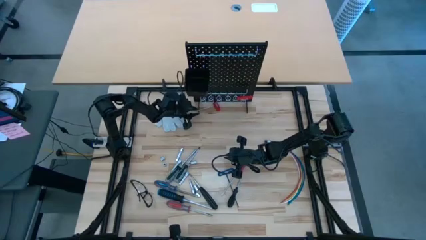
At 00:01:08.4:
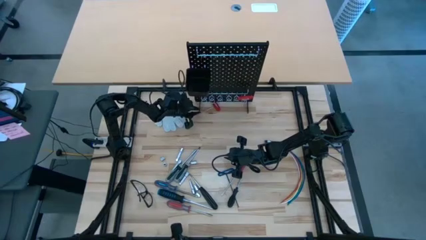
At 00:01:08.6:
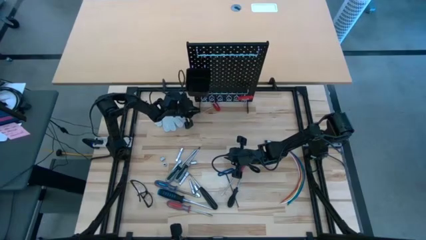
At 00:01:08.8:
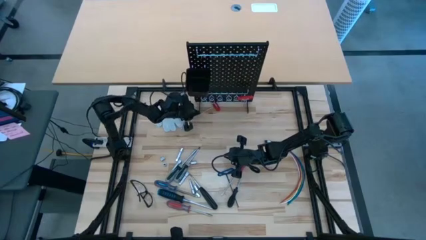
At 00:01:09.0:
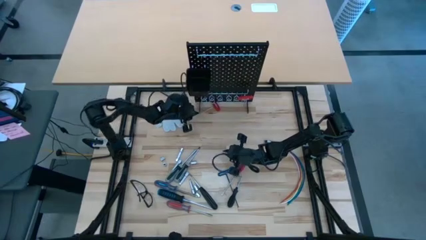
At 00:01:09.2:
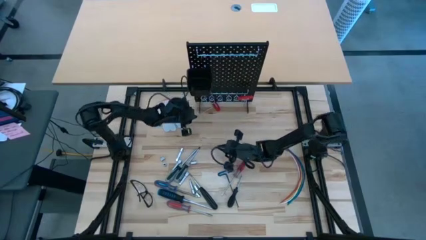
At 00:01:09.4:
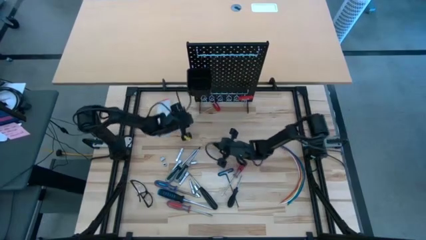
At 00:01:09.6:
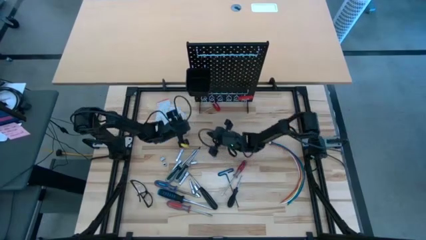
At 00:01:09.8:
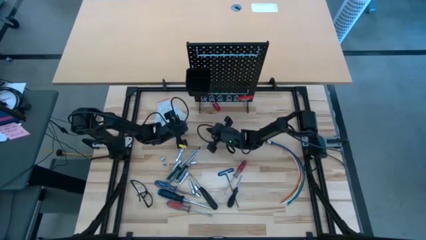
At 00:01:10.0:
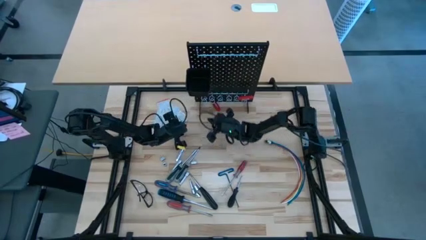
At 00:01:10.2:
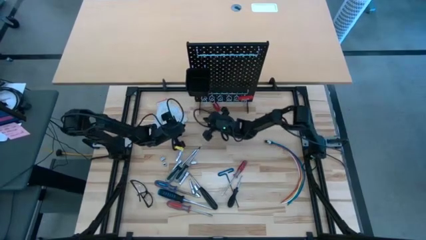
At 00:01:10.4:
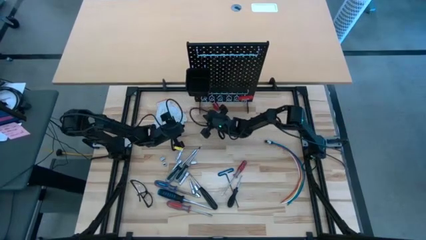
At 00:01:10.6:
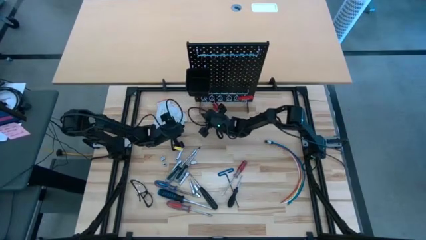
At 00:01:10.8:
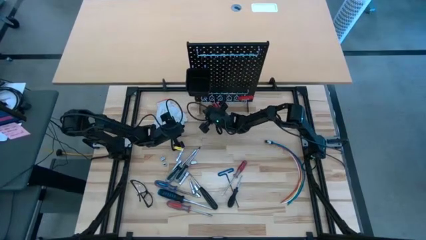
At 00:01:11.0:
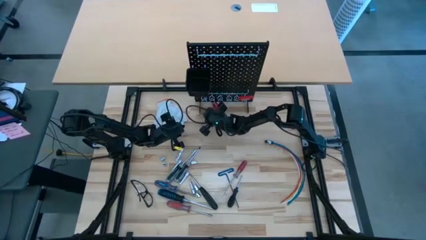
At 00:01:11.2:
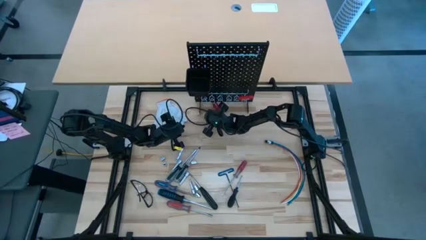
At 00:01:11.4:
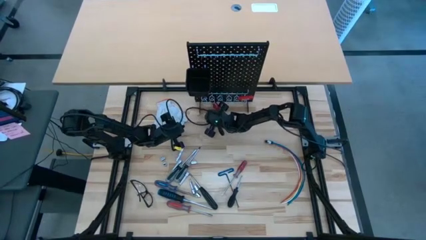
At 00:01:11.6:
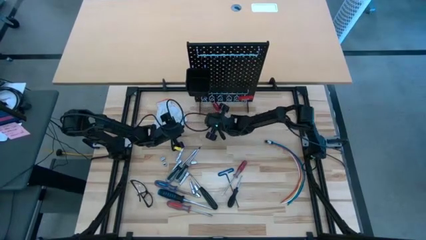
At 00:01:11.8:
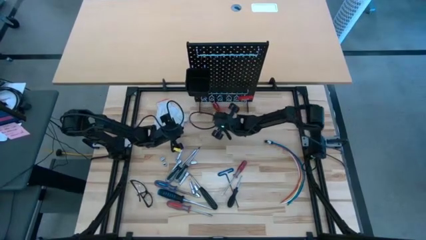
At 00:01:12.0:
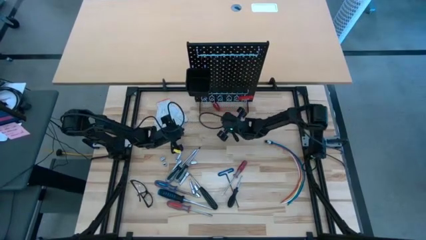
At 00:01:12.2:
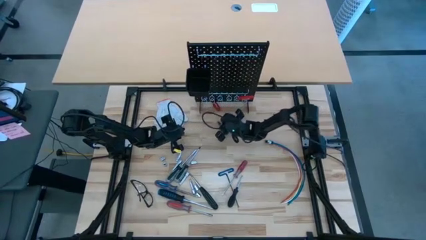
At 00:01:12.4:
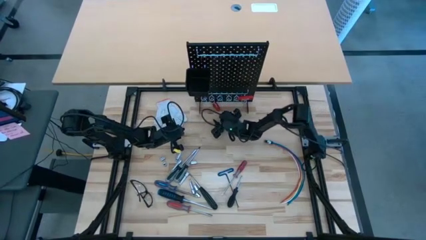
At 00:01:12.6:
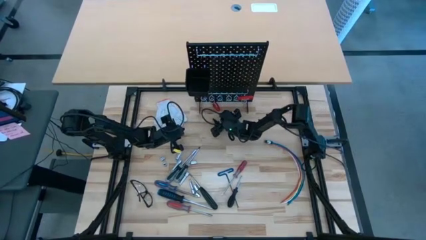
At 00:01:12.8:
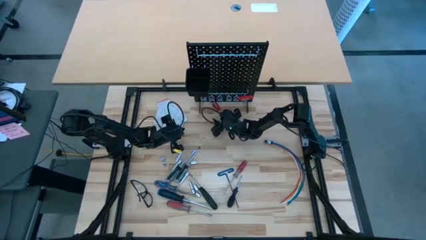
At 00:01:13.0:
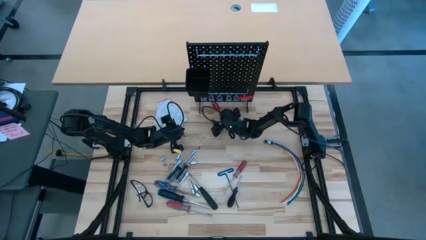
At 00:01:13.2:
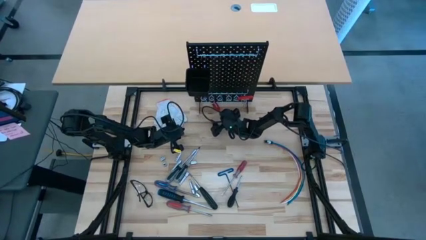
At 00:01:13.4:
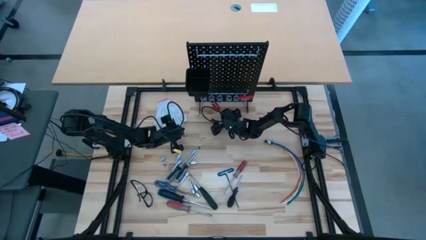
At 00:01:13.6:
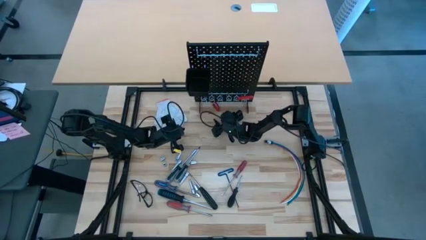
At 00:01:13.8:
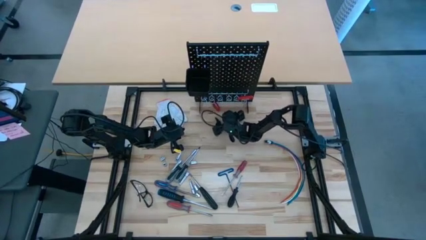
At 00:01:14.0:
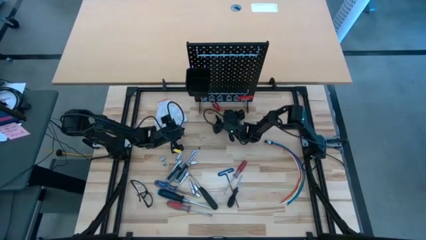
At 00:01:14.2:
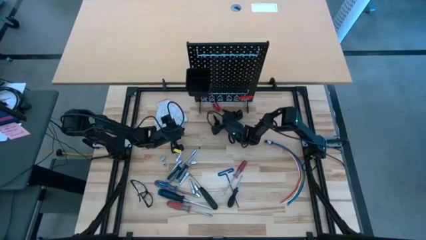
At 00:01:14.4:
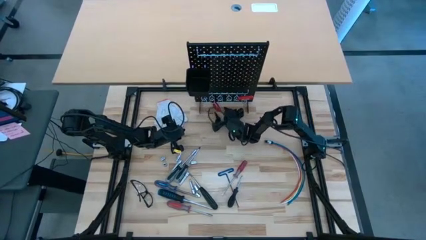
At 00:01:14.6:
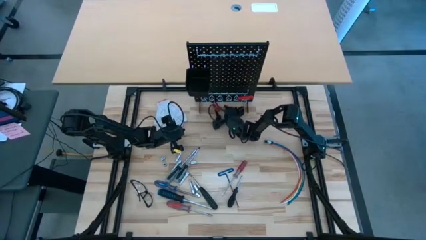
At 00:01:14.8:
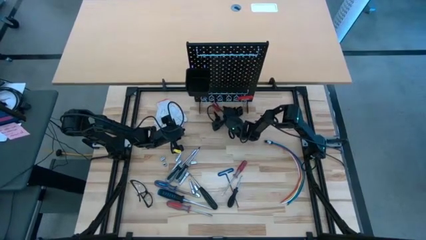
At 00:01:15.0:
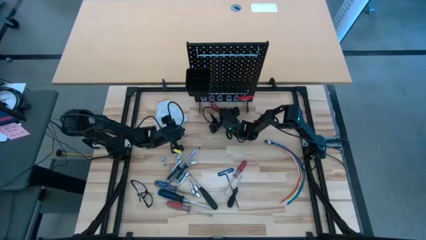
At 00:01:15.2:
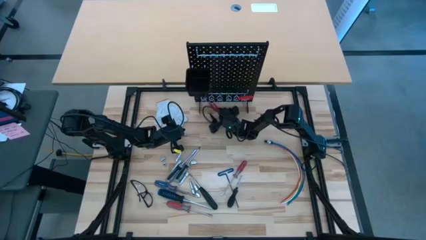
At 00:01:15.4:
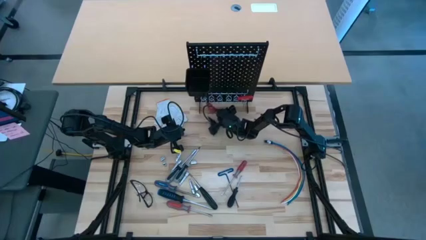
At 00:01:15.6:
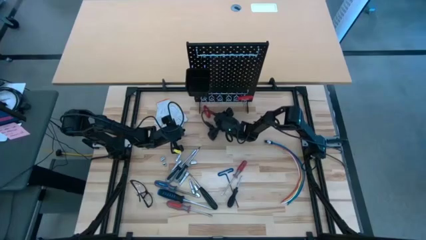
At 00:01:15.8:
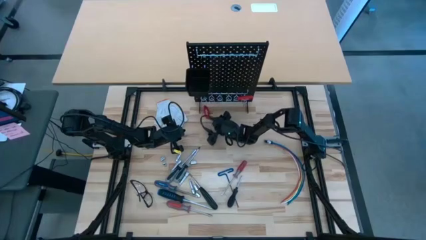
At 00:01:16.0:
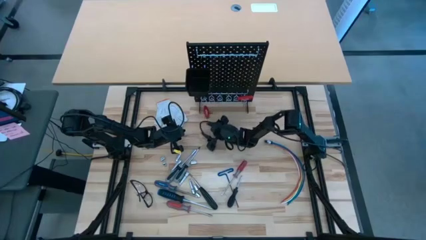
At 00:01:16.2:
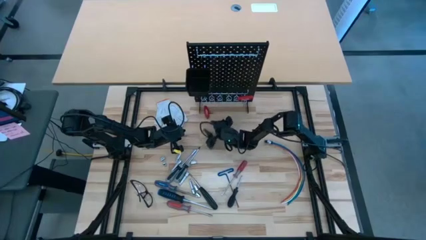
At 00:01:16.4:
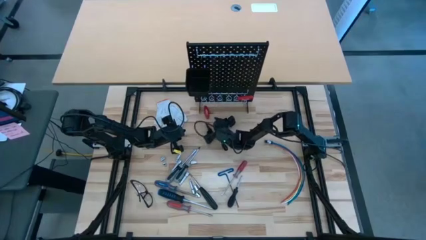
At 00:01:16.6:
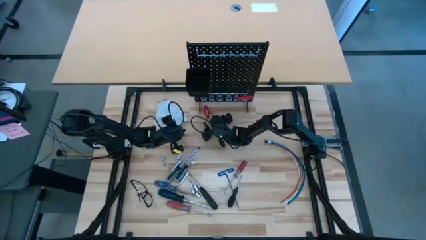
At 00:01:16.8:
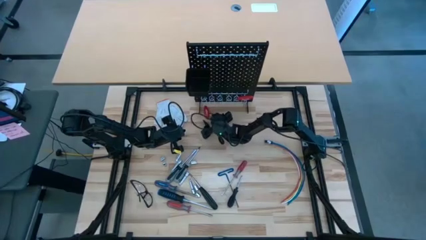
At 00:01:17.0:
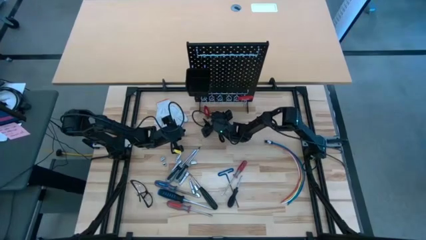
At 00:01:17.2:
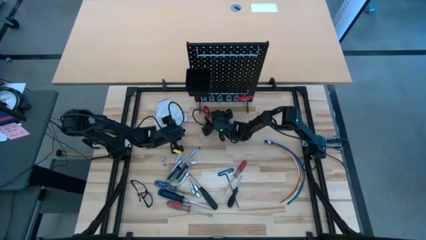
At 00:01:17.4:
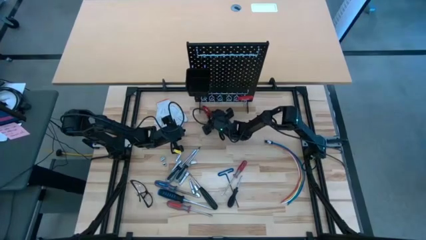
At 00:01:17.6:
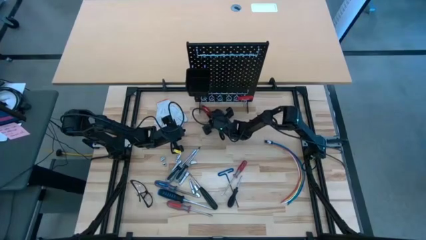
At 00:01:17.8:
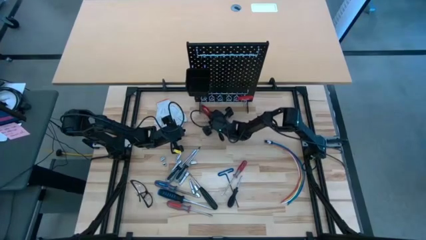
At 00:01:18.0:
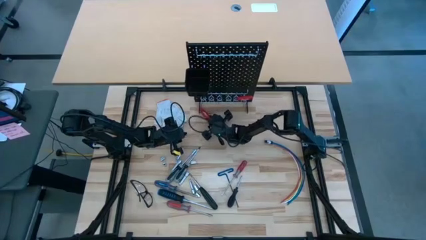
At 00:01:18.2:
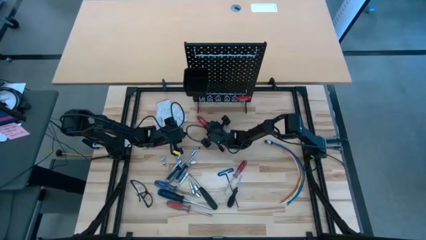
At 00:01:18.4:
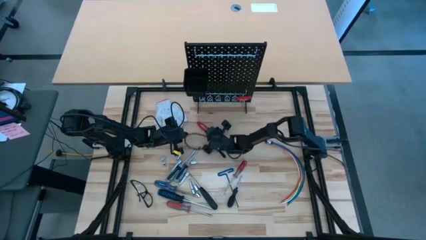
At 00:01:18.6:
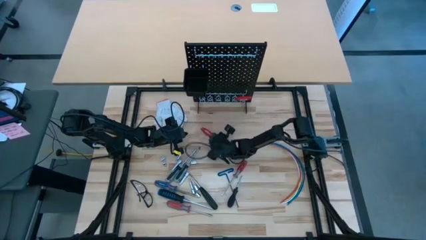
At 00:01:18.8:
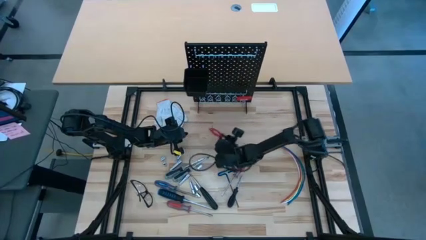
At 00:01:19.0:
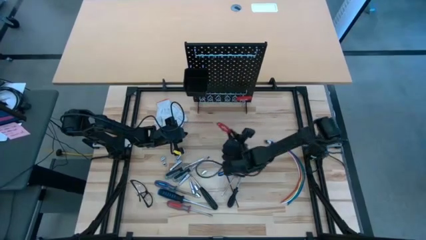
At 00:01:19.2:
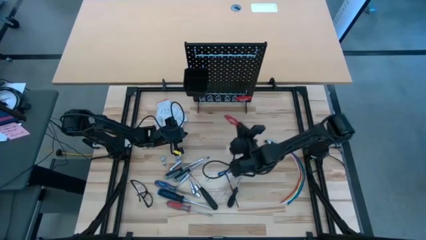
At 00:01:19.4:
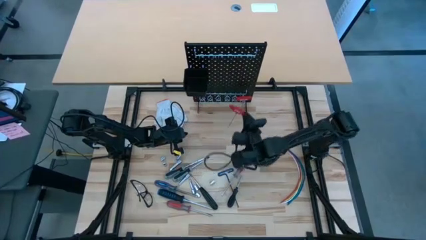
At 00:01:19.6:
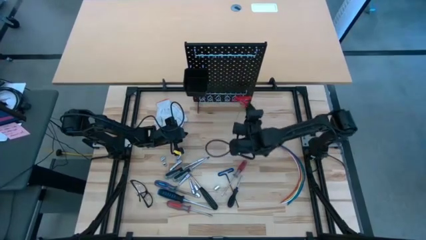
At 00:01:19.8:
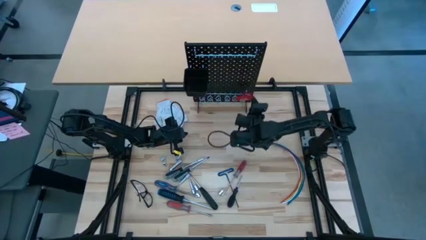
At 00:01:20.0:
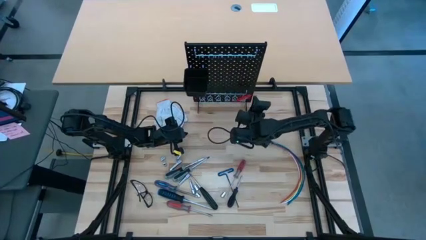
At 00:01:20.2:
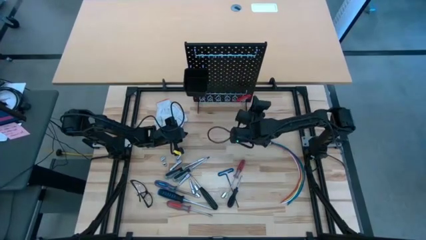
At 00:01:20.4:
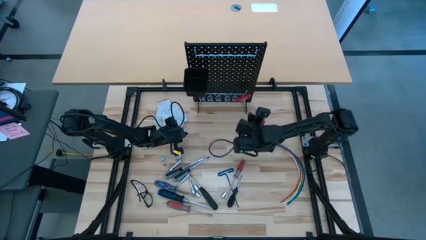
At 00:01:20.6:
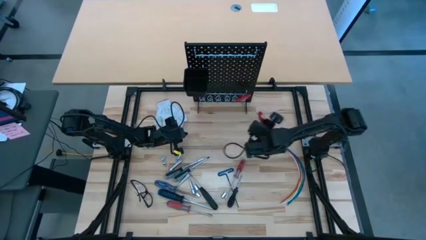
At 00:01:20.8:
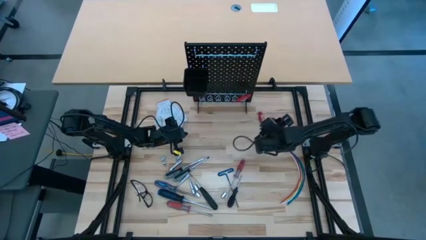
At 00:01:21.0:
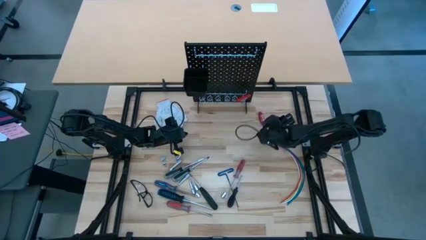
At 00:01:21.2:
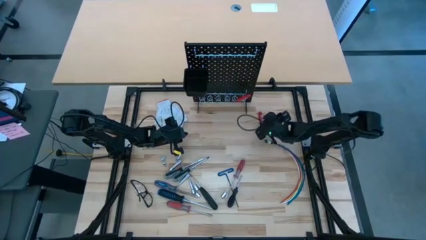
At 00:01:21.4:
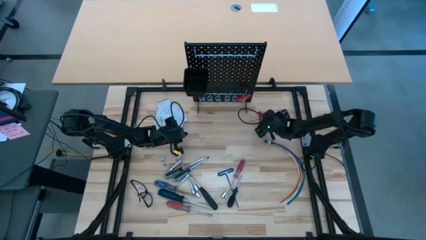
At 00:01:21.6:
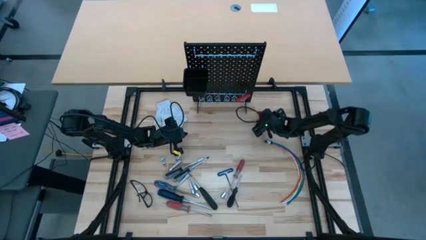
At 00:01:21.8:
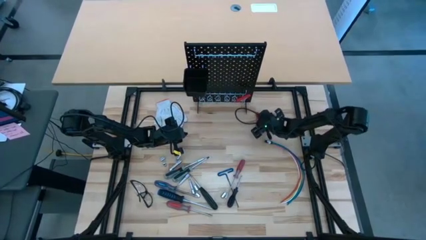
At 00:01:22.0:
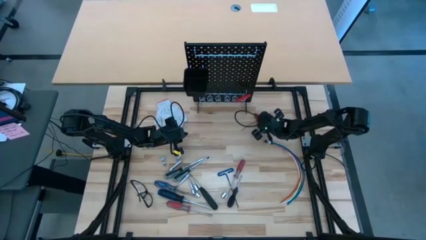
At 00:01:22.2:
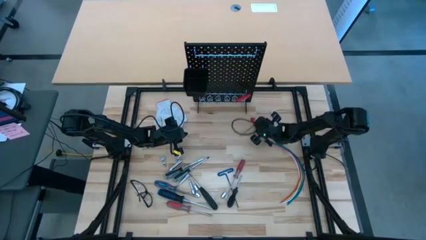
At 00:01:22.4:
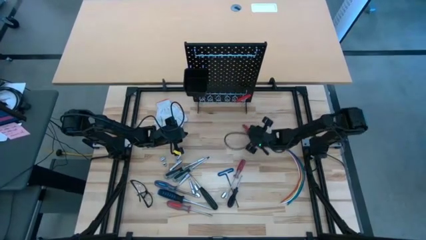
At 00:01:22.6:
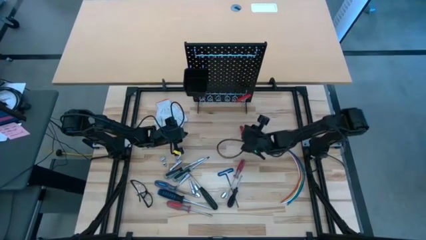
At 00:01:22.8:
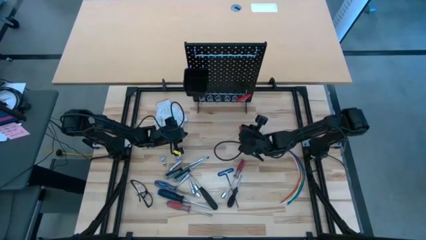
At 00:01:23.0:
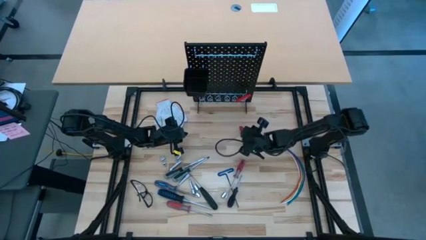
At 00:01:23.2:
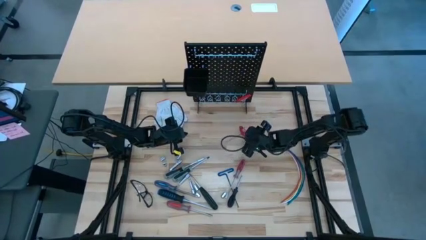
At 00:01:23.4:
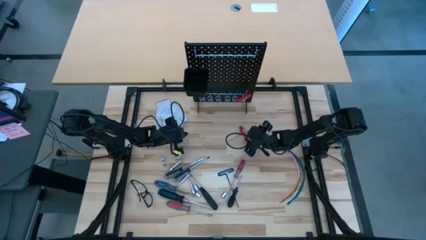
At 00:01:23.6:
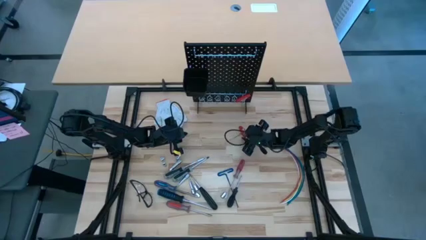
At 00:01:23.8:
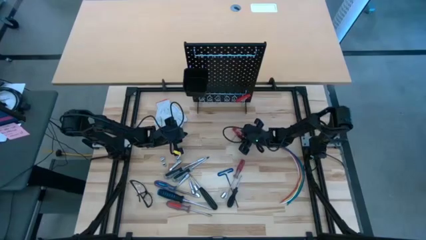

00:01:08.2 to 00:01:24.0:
Task: Hang tools onto peg board
Hang the red allen wrench on the pegboard
